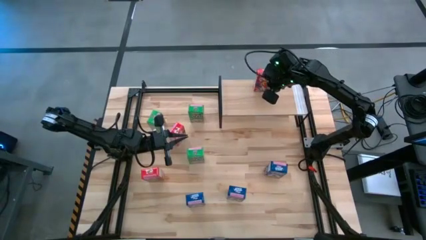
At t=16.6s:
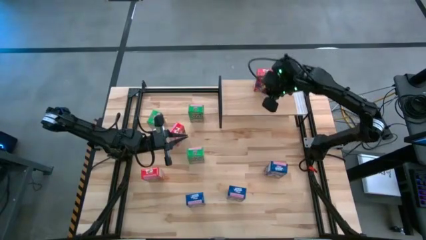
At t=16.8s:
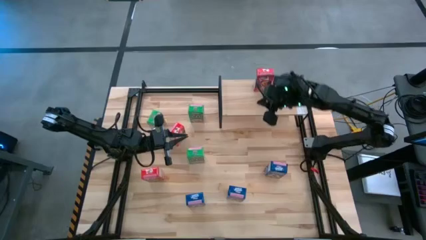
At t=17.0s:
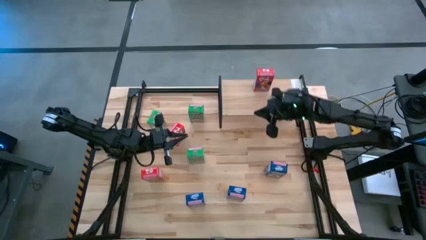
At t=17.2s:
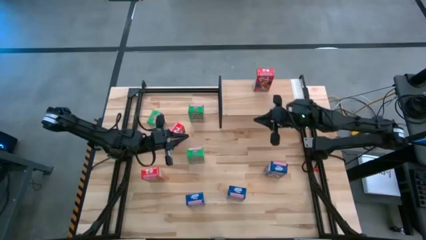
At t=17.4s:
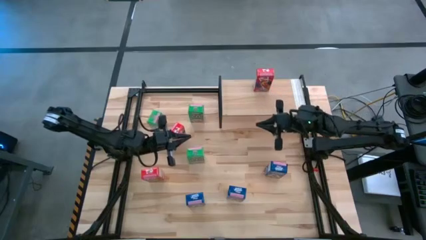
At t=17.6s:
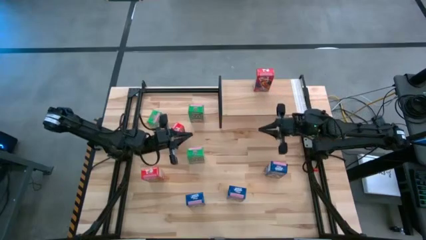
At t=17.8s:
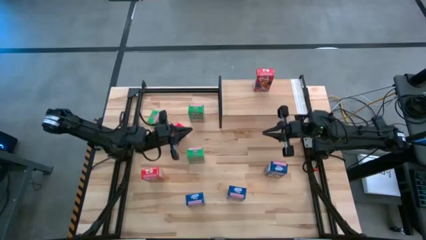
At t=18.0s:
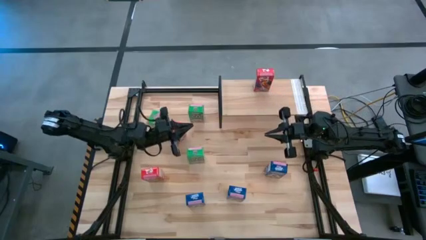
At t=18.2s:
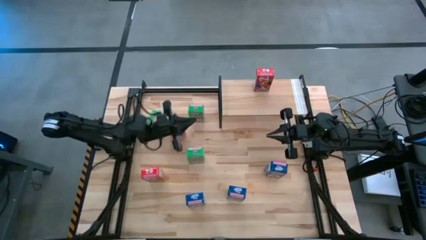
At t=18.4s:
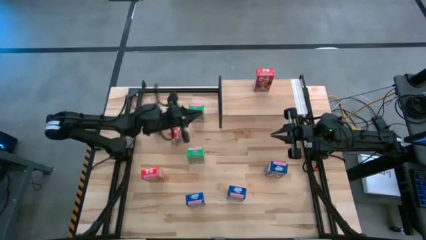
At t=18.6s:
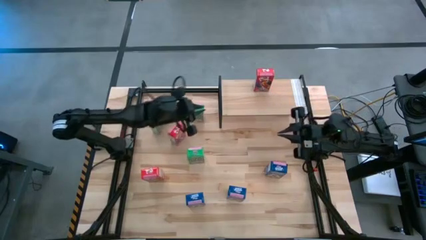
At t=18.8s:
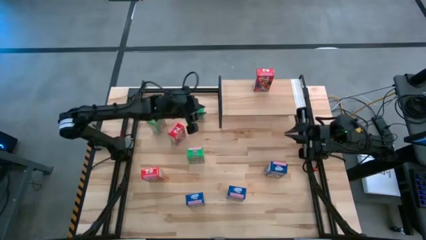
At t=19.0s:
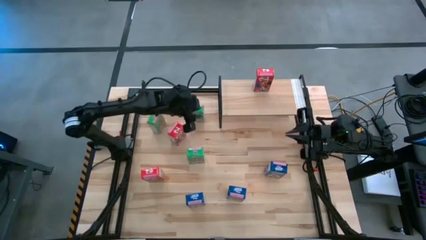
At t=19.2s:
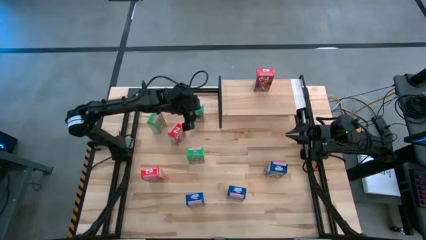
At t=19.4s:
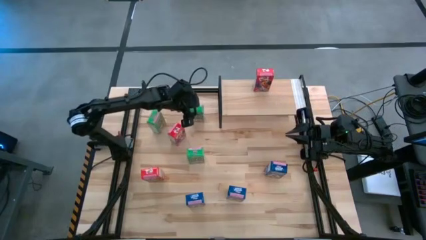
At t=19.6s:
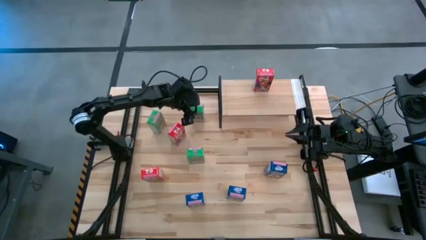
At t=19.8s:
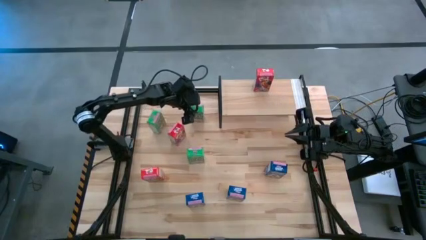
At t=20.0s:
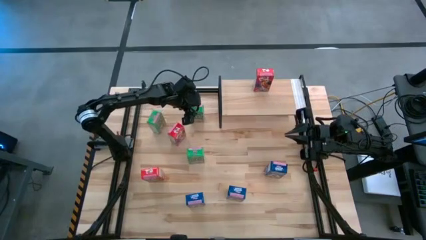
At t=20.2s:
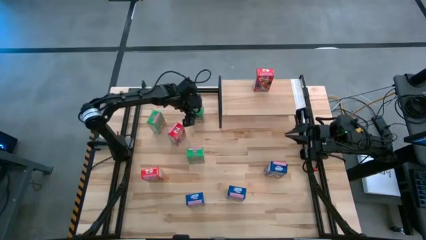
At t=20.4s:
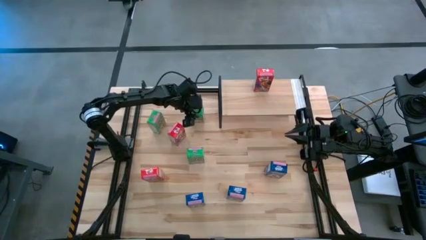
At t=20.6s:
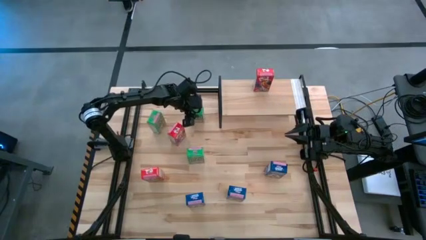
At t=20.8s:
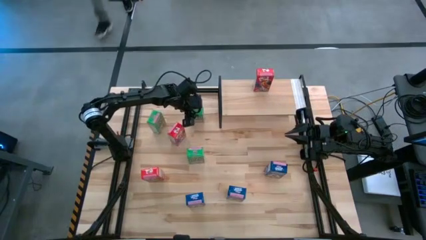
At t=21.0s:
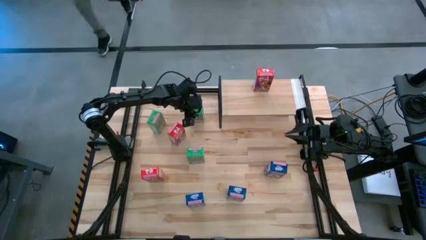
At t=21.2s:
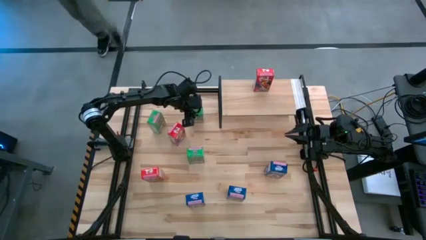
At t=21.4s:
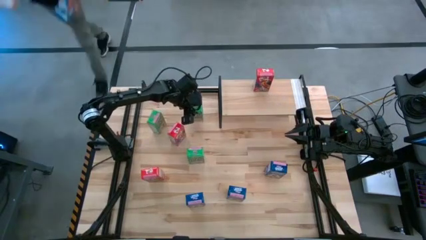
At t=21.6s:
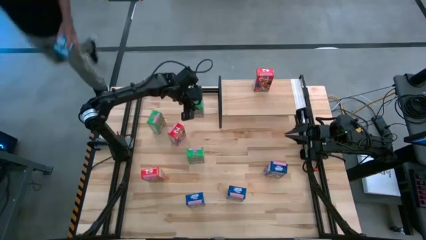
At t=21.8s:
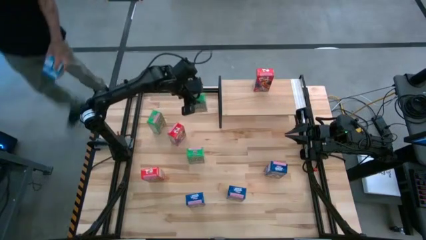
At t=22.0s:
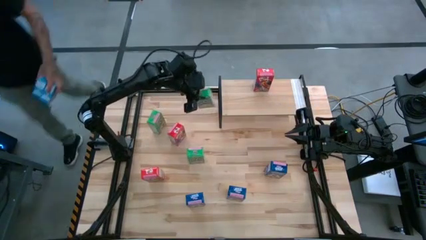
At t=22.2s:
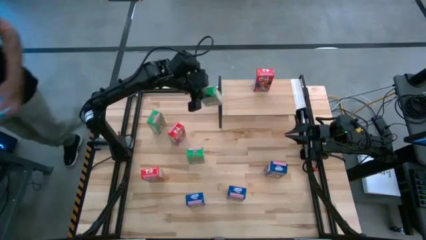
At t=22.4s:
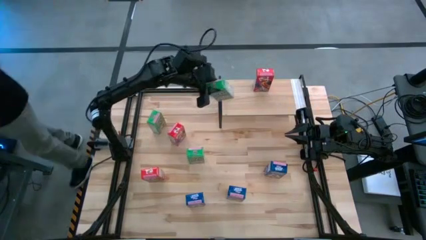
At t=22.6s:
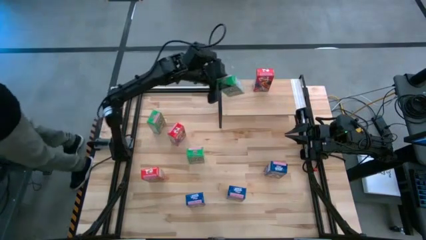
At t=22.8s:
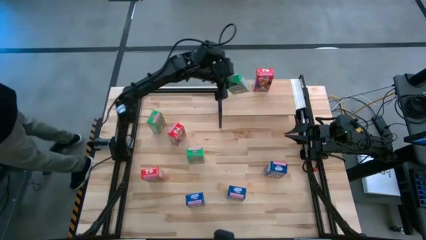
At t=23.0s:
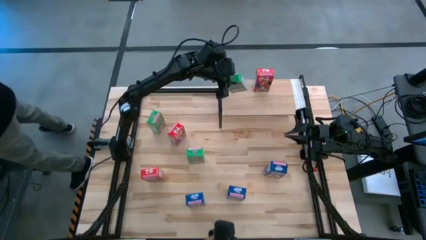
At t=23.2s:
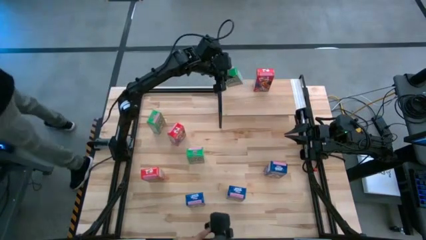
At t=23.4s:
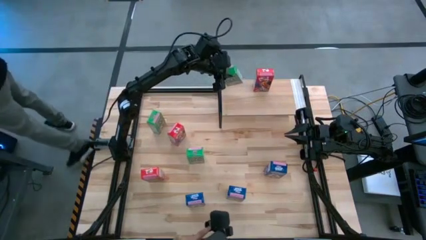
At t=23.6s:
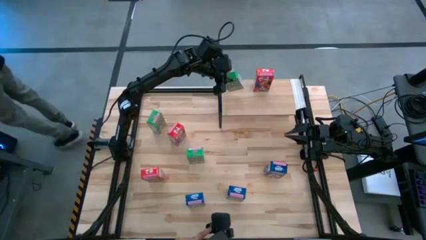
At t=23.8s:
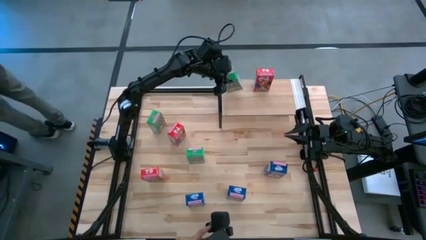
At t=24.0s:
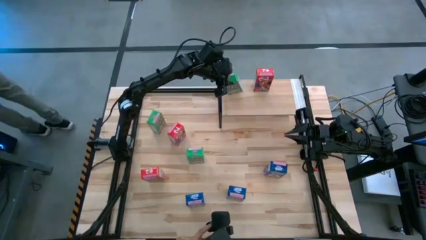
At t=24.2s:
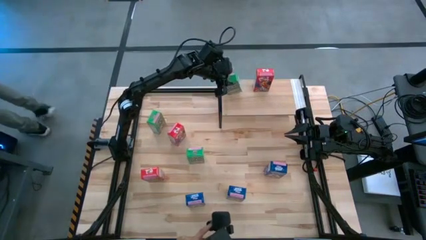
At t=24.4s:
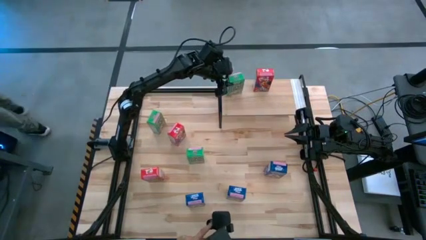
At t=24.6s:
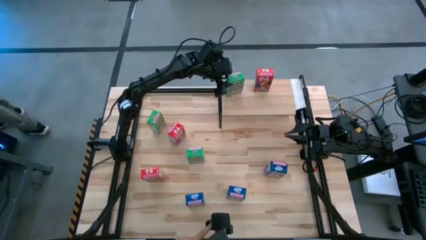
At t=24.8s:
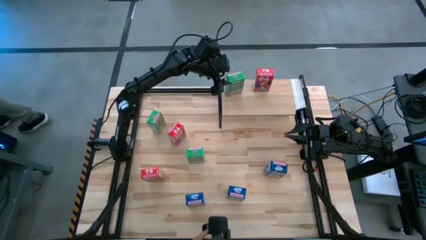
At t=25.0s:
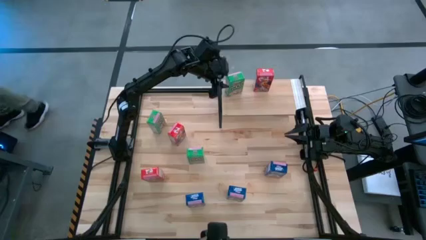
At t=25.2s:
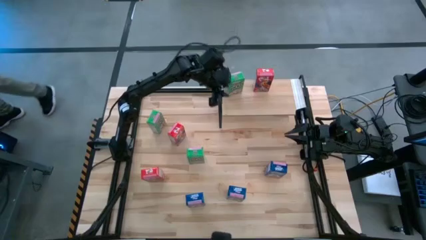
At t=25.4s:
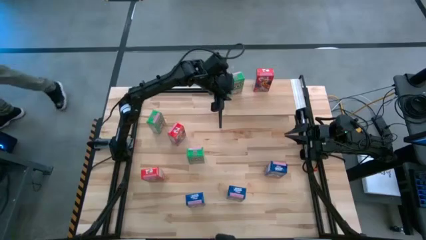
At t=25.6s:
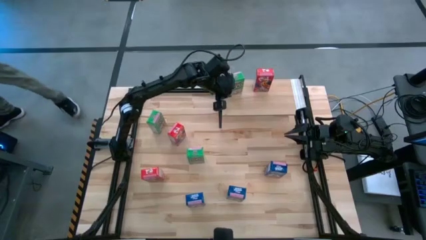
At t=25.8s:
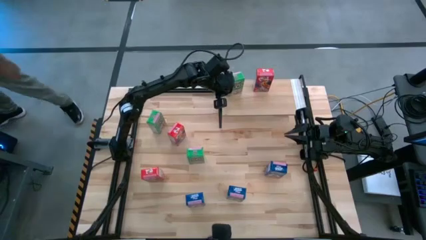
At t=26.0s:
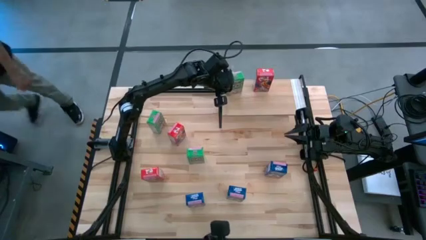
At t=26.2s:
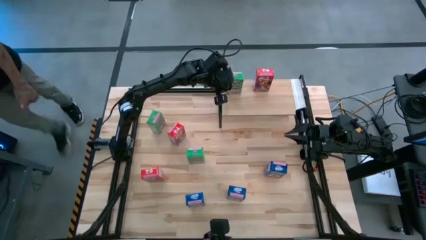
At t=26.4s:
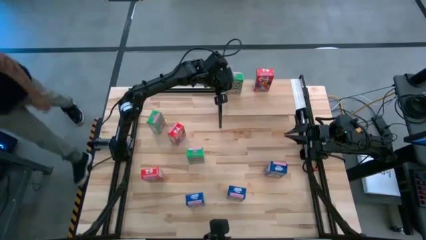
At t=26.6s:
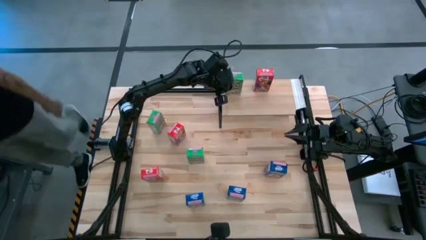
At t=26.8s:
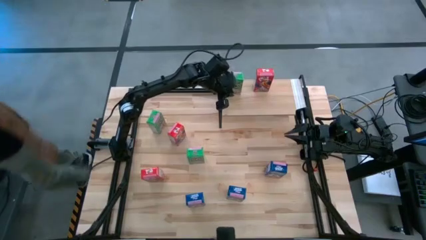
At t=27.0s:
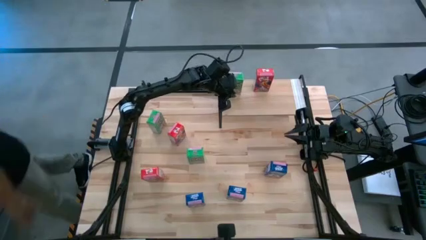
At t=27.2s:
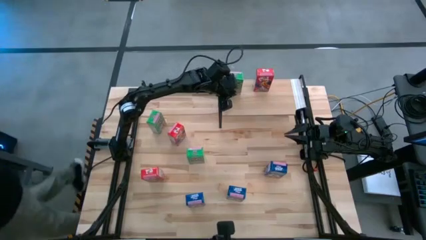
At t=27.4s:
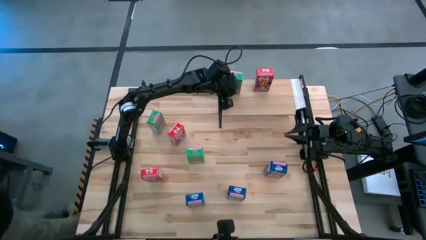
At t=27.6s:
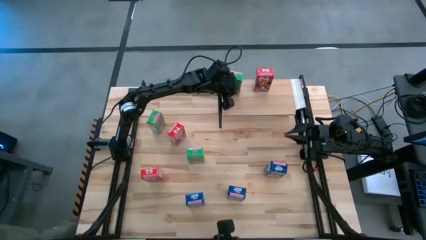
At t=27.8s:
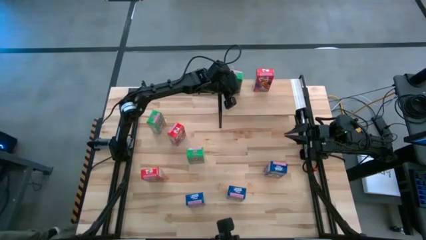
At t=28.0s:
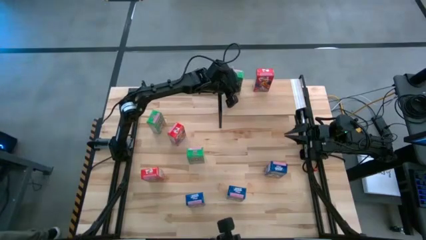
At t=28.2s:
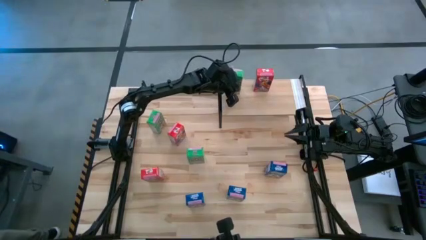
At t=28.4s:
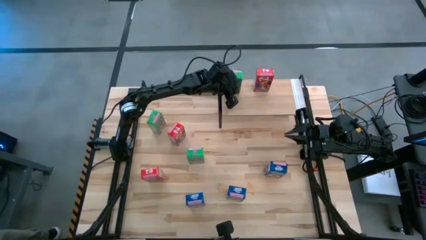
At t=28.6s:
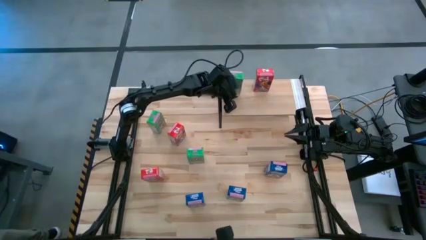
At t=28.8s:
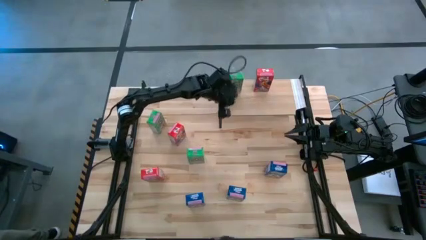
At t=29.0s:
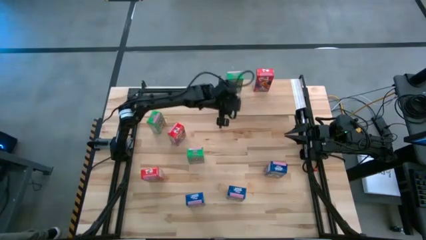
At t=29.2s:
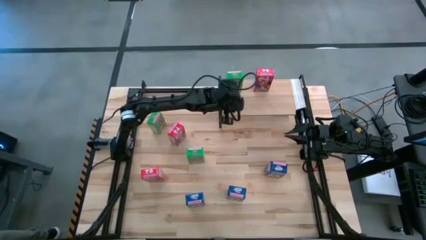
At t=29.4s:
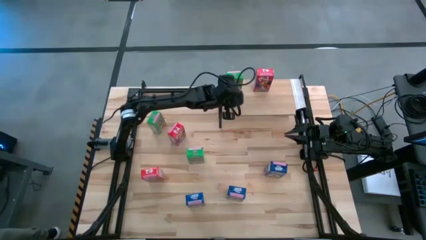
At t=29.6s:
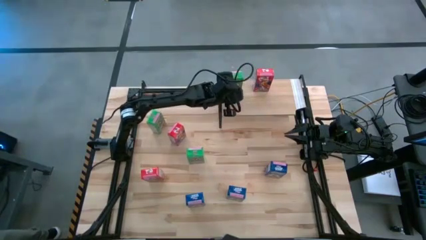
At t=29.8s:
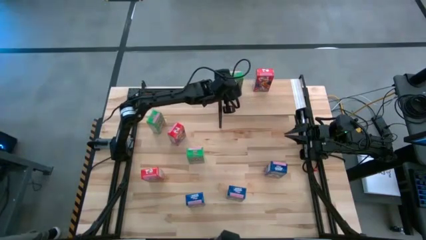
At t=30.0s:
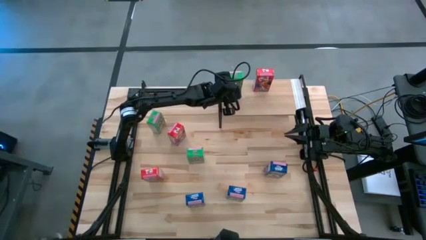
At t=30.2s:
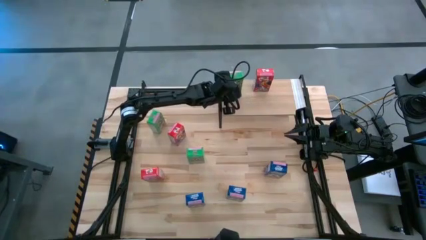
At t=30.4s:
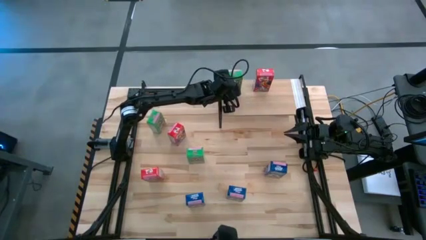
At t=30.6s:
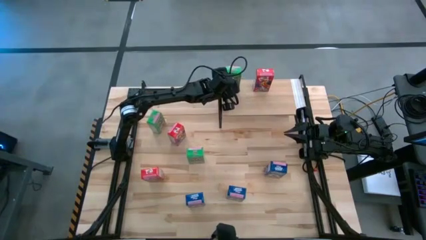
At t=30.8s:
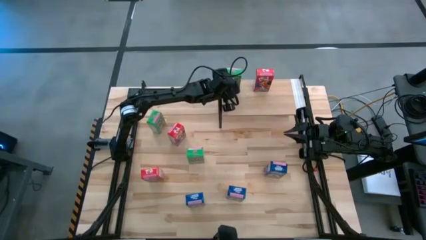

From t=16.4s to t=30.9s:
Task: Stack cereal on shelf
Put the top right green cereal box on the shelf

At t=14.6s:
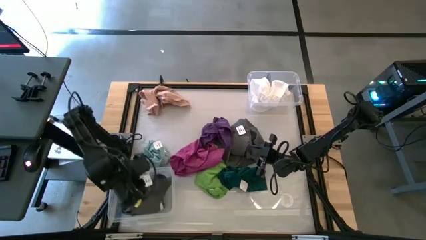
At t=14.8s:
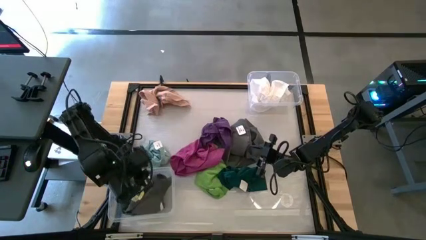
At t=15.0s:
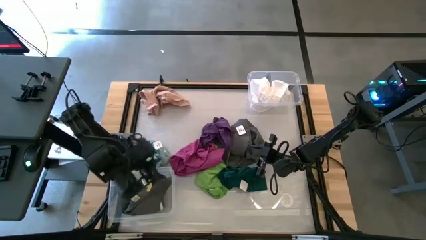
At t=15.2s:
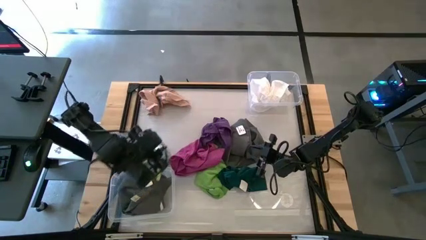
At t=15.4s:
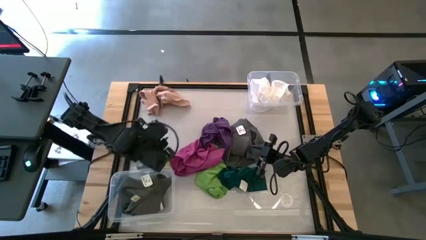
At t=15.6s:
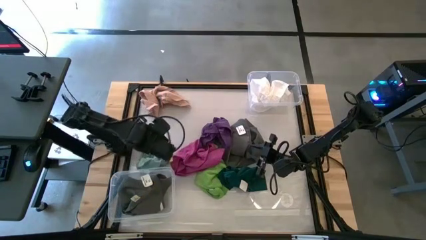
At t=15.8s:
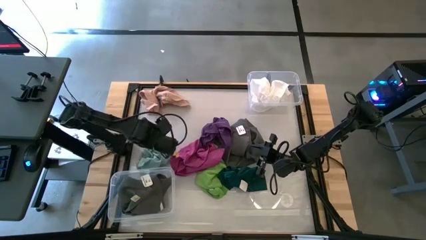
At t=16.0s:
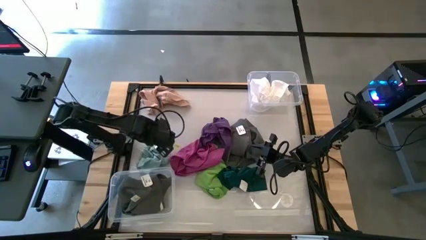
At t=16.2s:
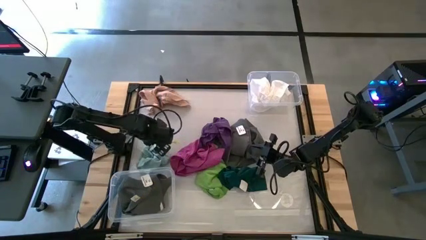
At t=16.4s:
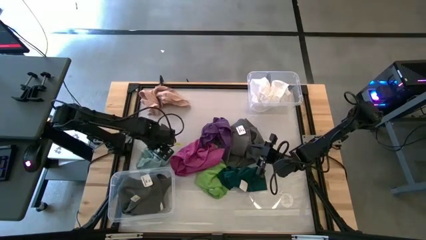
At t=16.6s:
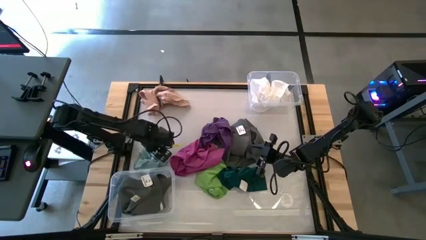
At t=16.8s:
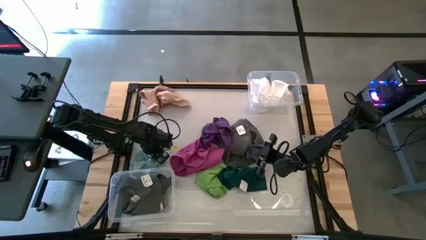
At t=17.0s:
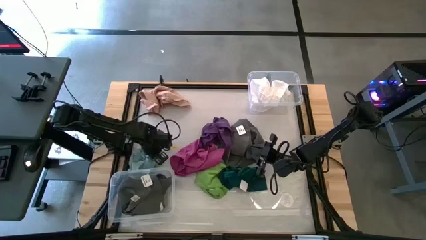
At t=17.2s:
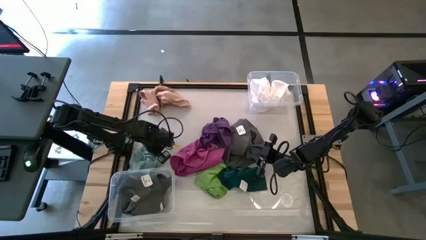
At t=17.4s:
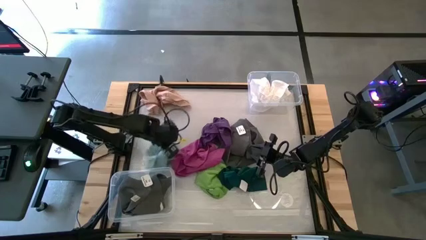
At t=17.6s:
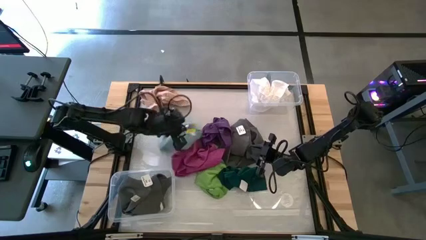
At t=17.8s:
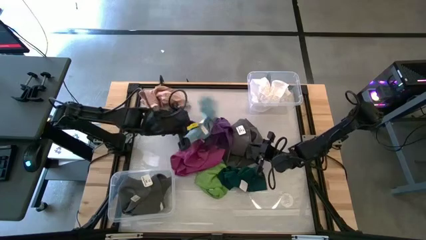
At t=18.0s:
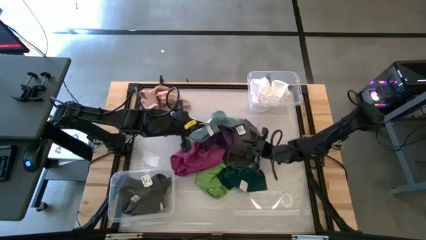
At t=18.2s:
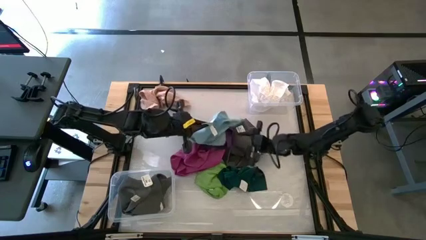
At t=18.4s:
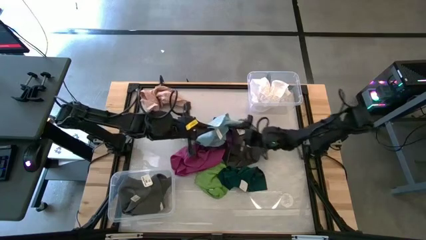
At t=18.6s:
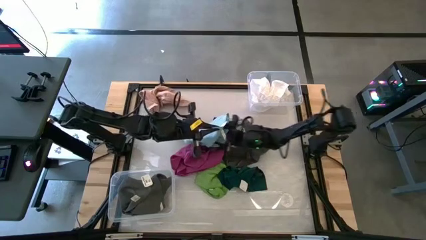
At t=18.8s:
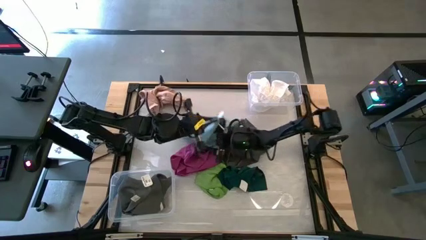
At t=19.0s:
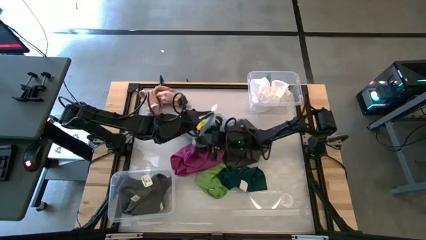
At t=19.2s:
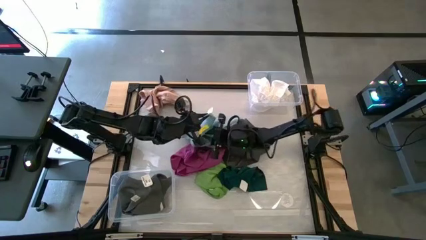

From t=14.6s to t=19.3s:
Task: Sort towels by color in basket
Put the light blue towel into the top transparent bin
